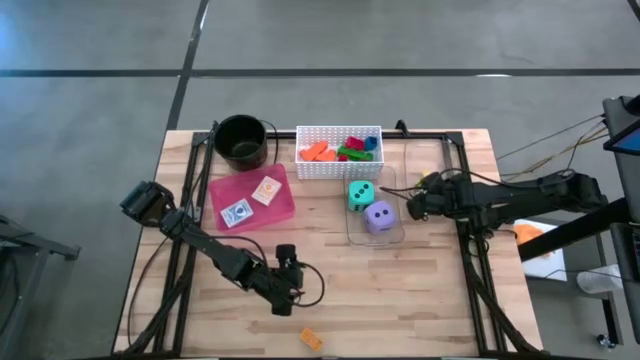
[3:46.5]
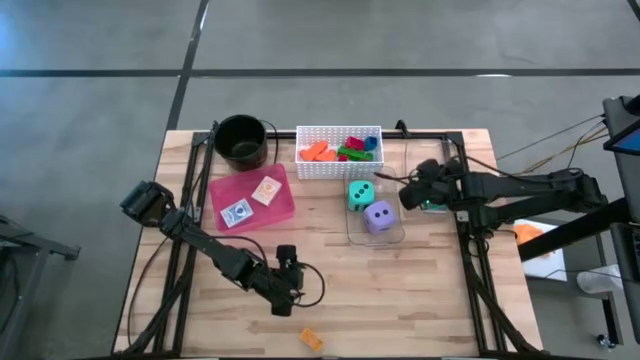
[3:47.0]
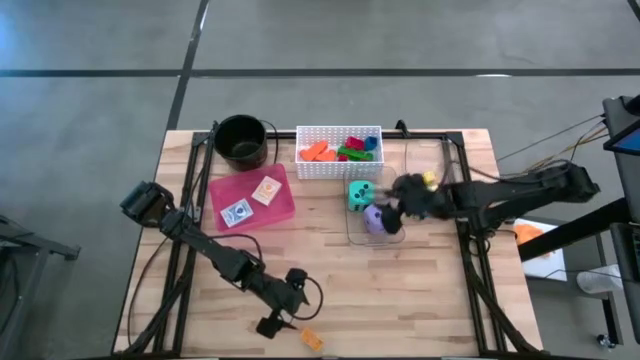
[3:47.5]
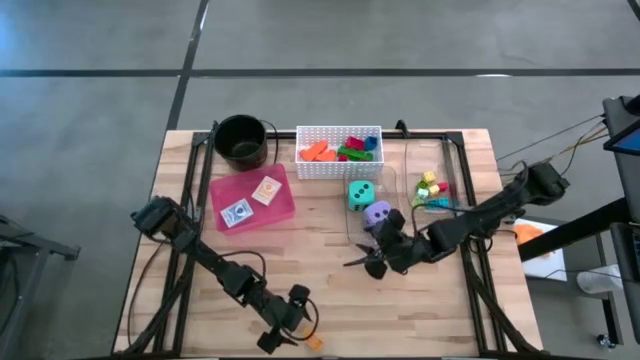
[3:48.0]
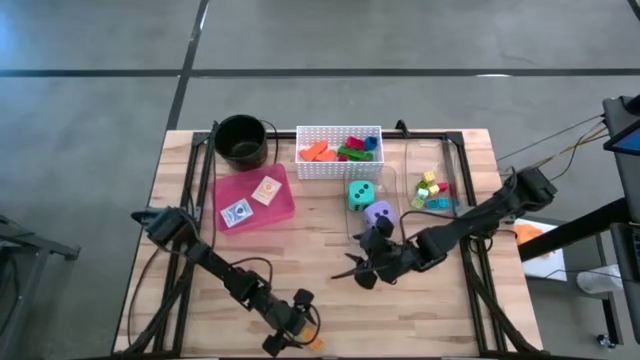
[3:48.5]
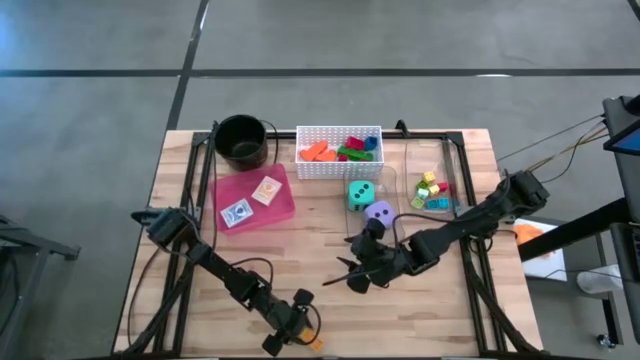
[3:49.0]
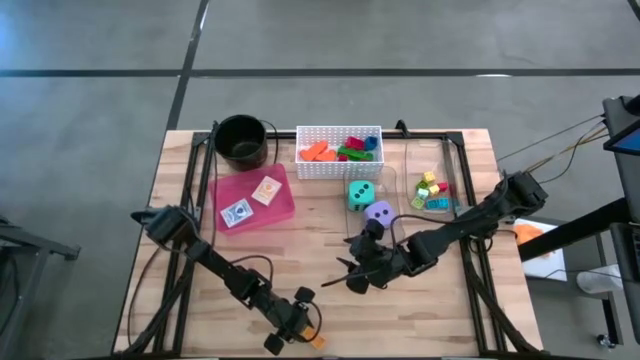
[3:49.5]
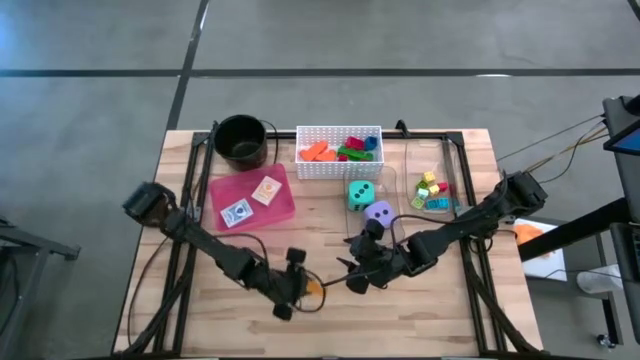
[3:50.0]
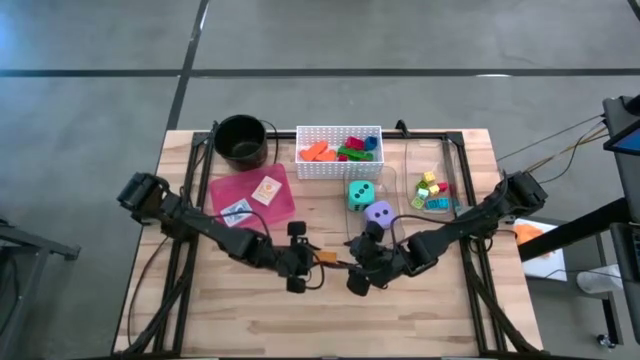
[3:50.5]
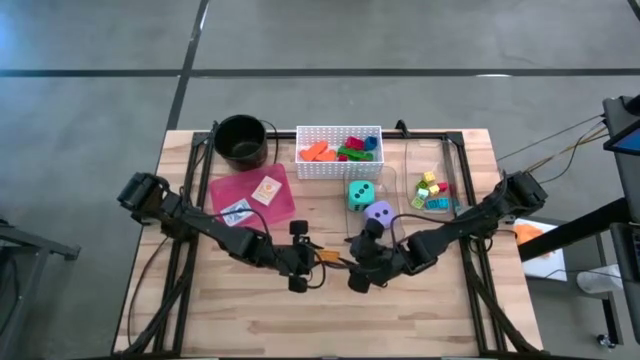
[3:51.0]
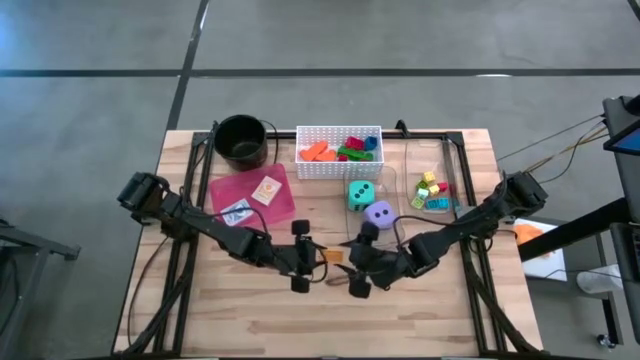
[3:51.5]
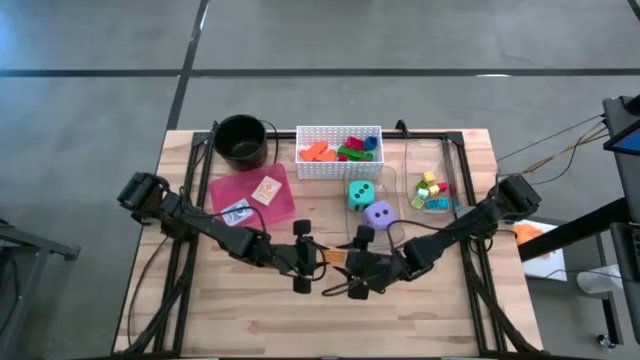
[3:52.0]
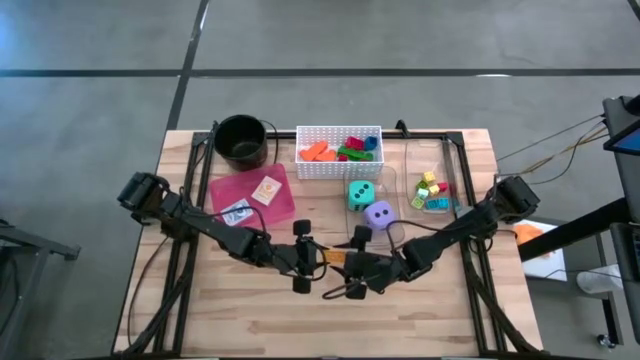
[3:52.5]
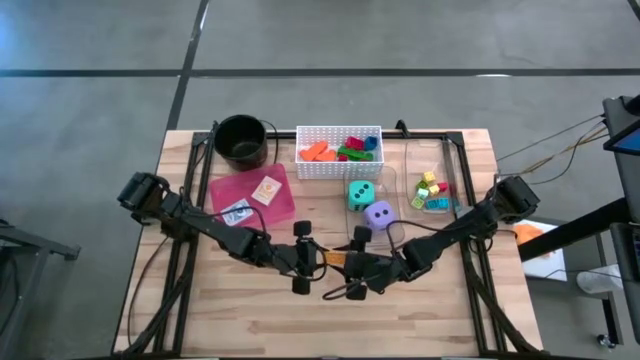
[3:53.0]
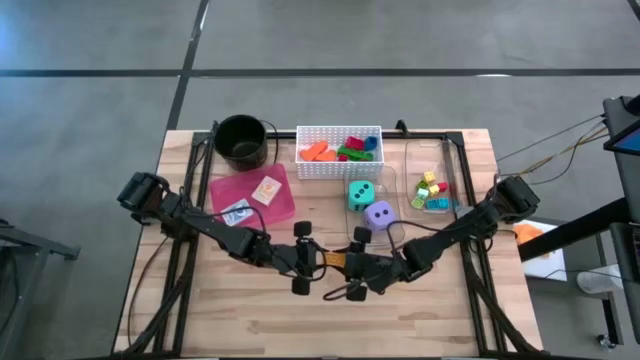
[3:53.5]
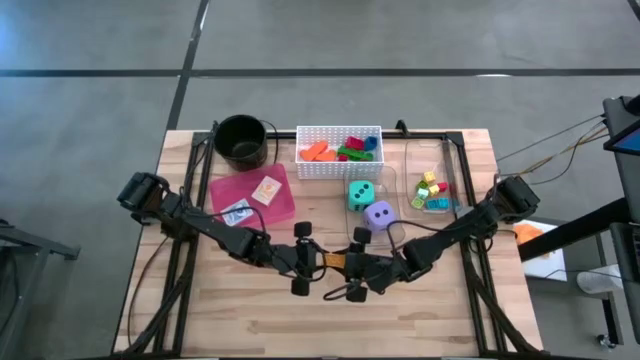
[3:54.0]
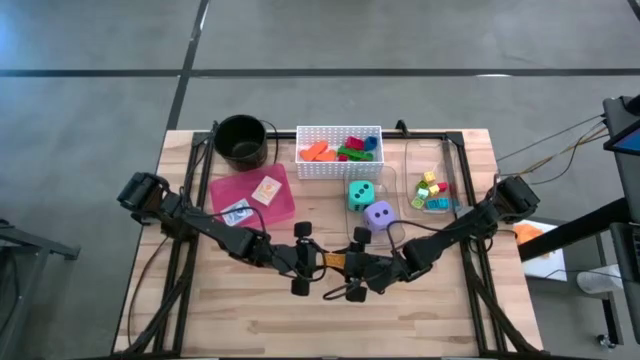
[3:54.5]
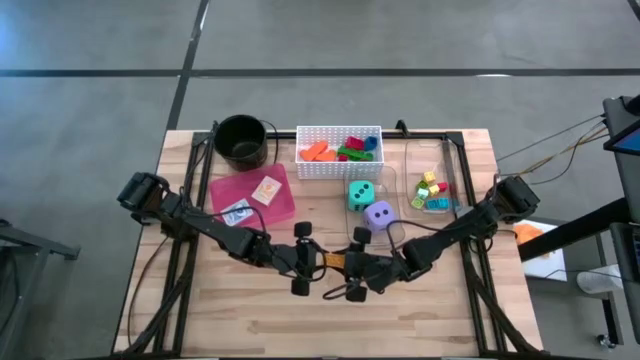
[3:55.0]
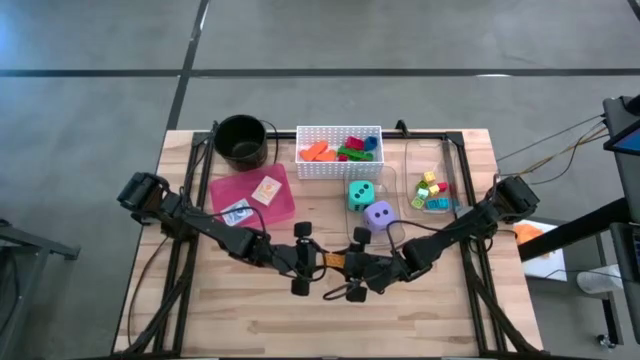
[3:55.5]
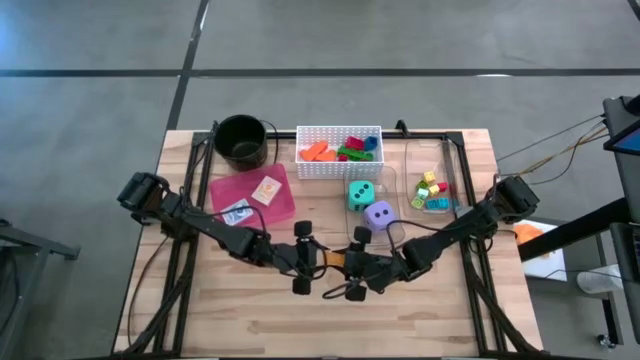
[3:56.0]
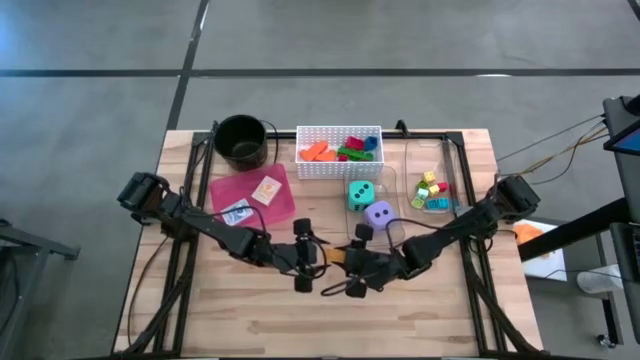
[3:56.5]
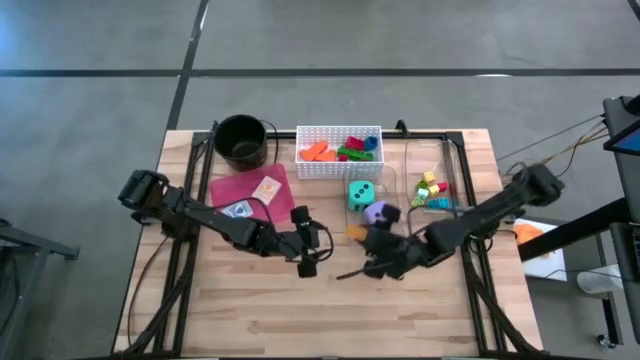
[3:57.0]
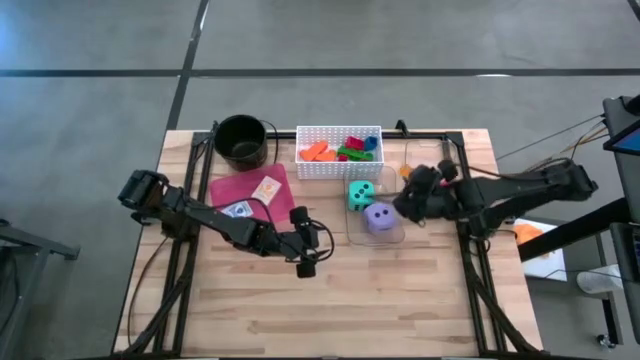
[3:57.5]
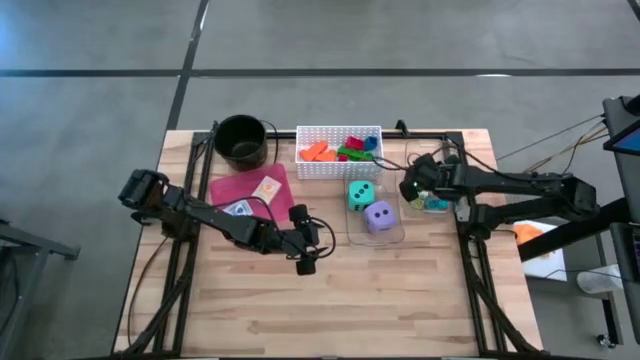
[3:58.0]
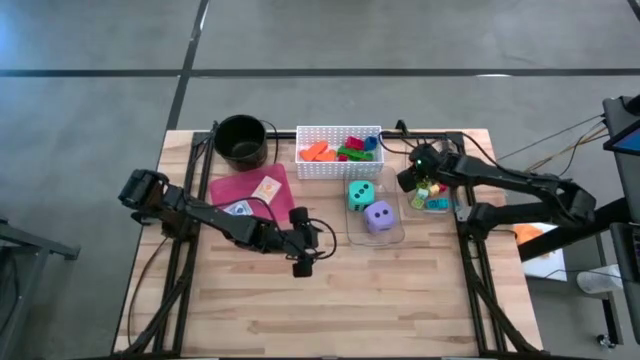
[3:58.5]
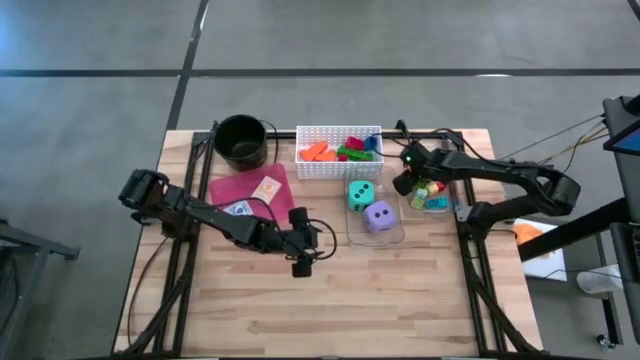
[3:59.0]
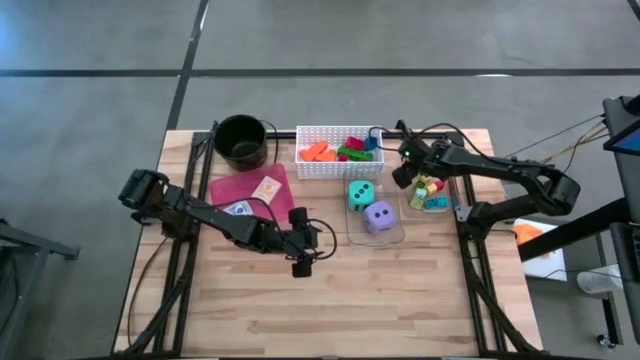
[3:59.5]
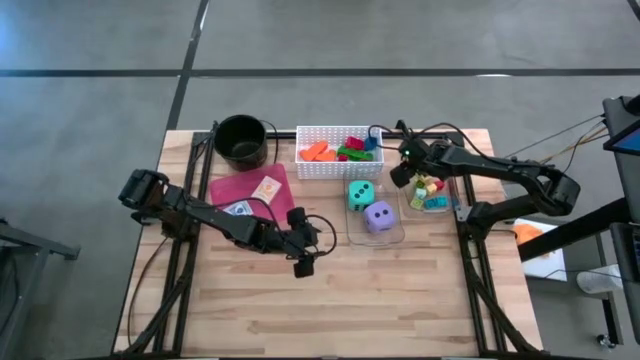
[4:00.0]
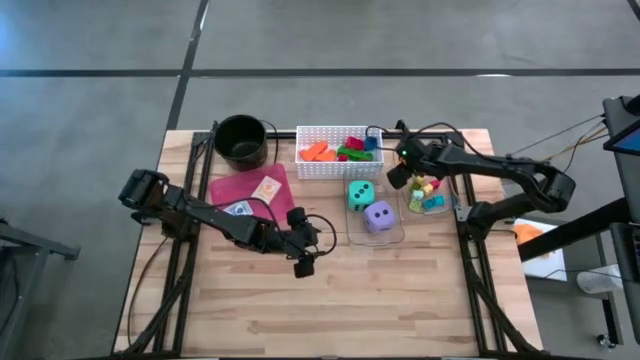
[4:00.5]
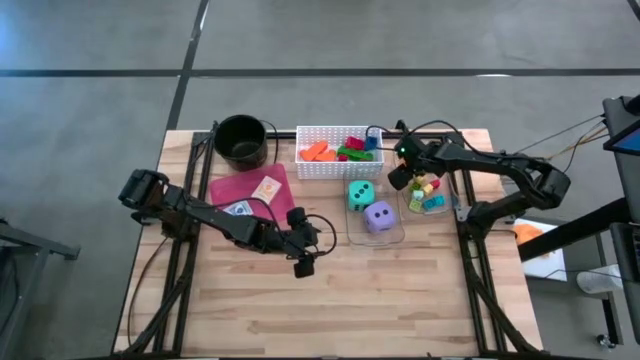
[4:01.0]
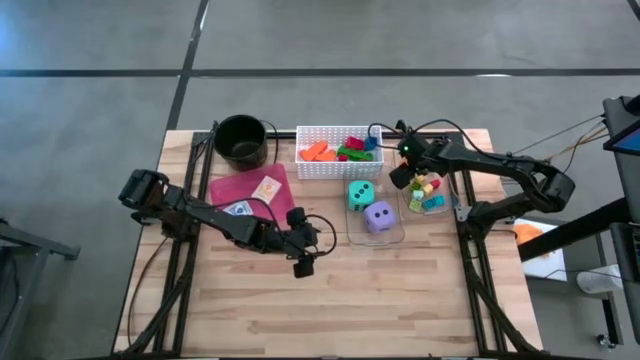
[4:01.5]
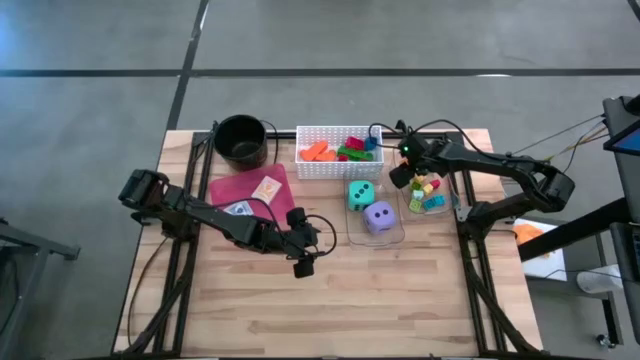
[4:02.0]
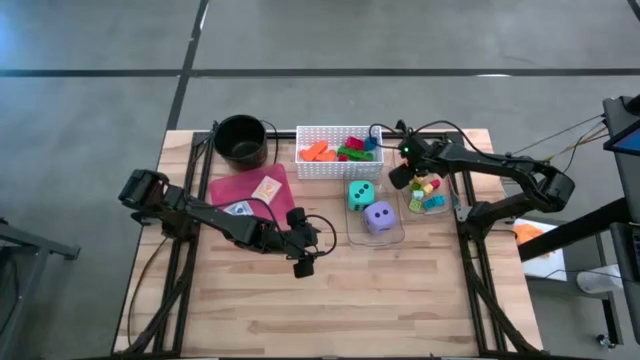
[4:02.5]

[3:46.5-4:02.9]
Task: Pick & Place Toys
Put the small dark yellow game piece into the right transparent bin
